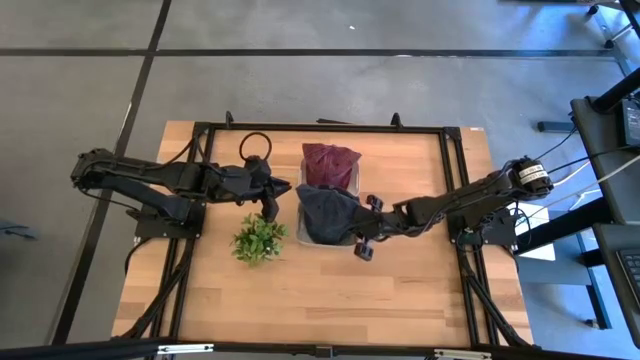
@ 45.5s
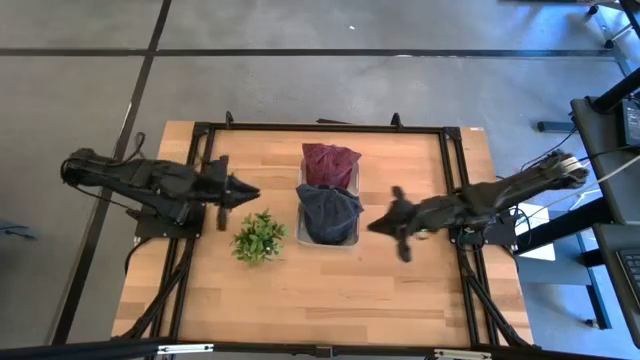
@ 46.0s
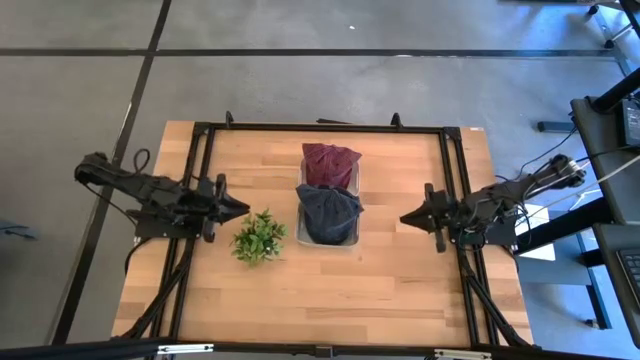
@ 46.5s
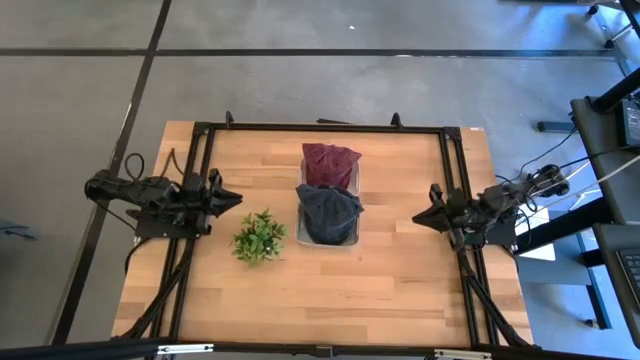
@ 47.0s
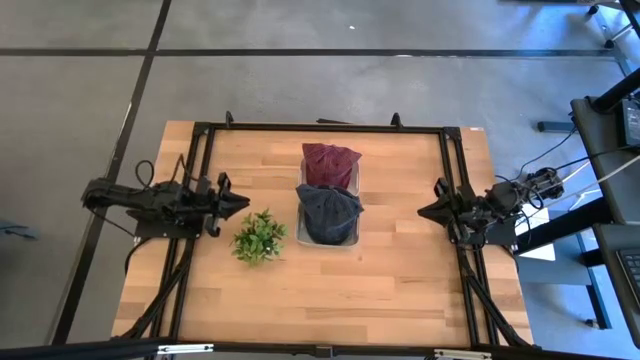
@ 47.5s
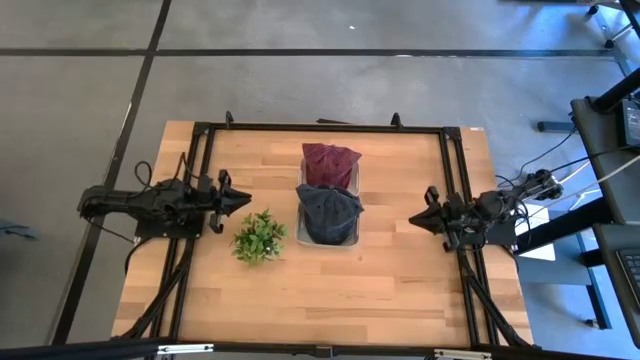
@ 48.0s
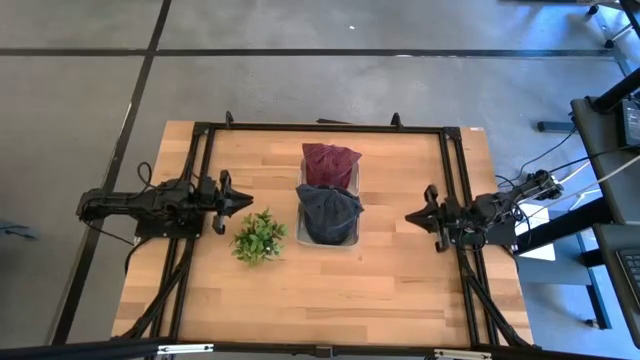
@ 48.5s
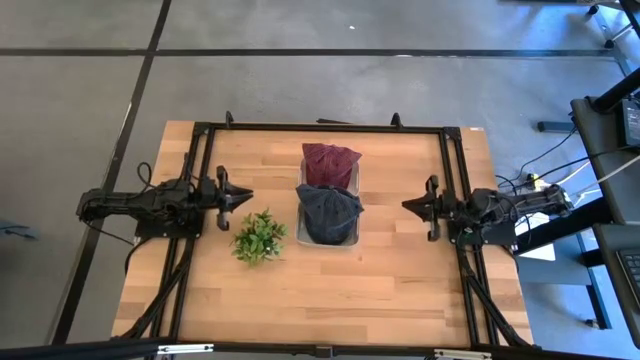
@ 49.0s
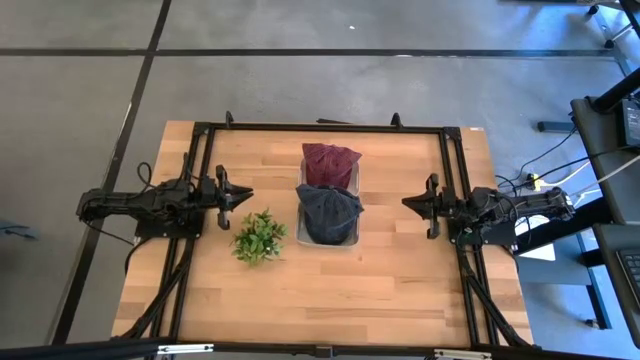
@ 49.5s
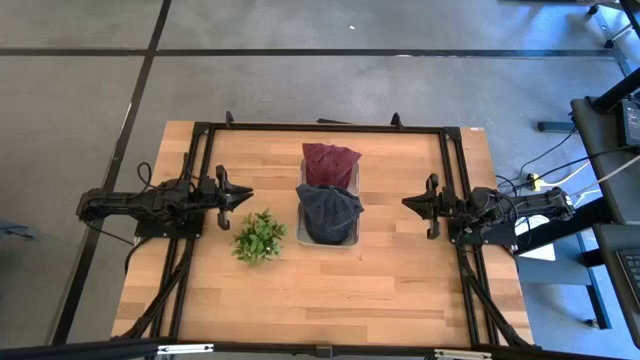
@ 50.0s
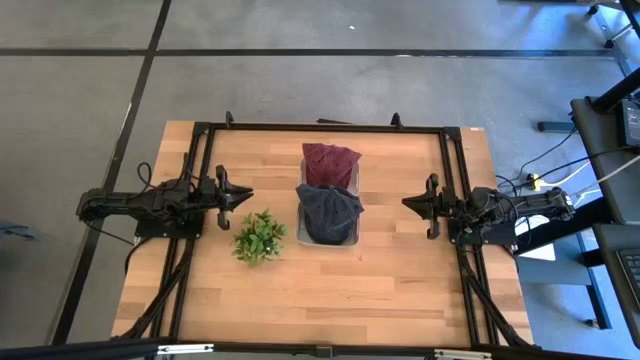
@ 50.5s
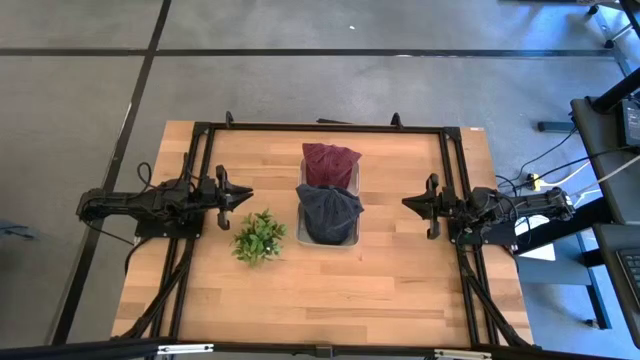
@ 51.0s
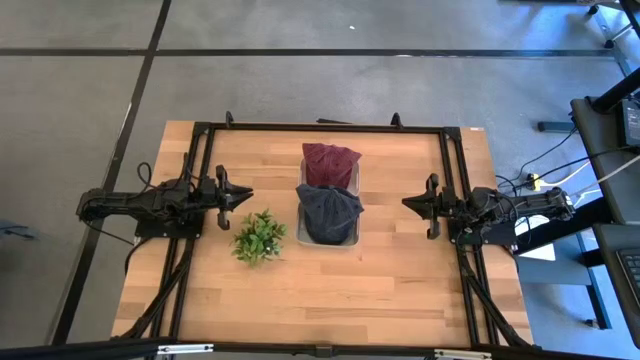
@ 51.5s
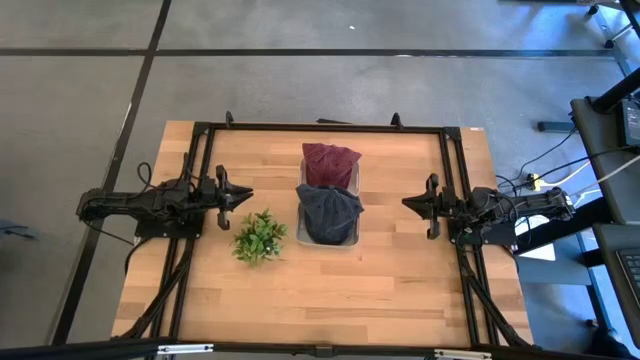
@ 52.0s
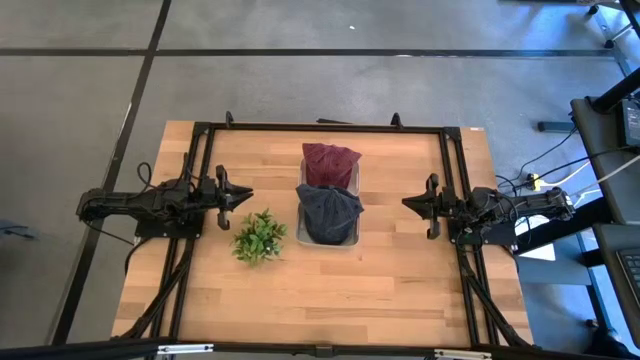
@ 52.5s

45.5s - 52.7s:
Task: Pick & Place hat
Return to Home Position

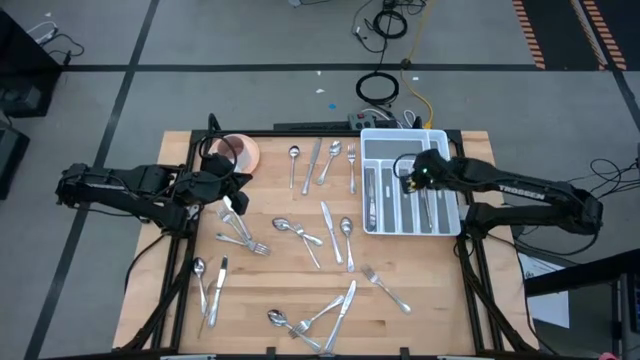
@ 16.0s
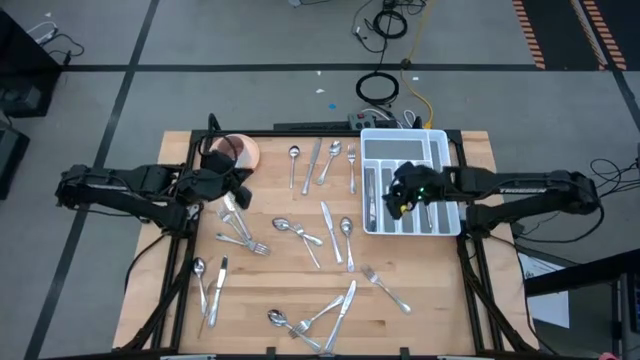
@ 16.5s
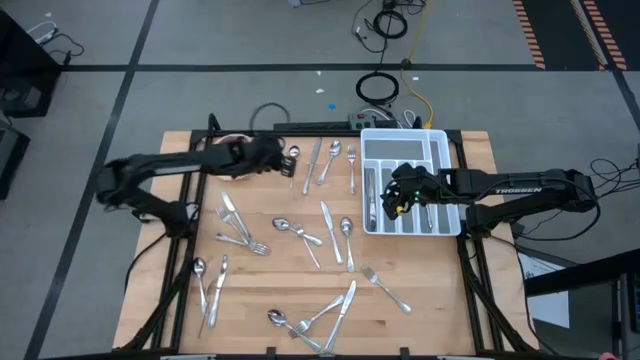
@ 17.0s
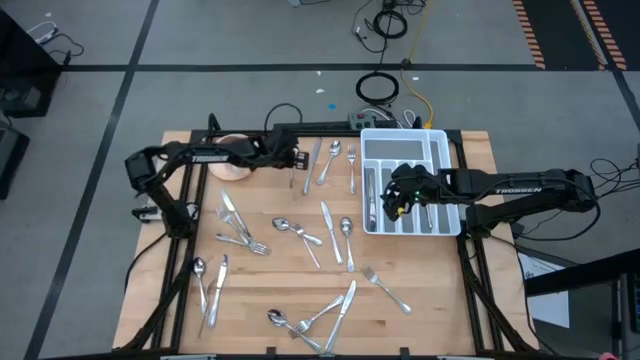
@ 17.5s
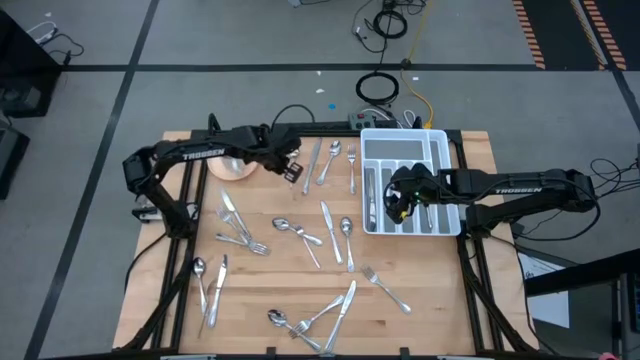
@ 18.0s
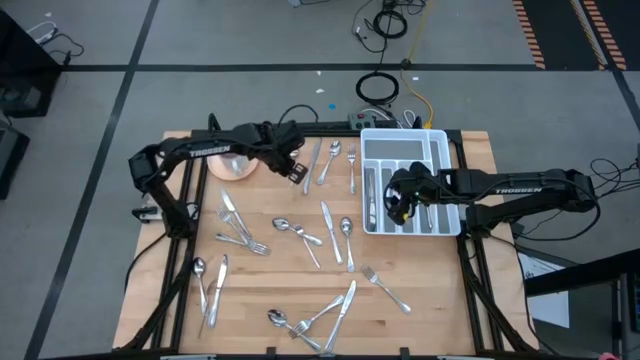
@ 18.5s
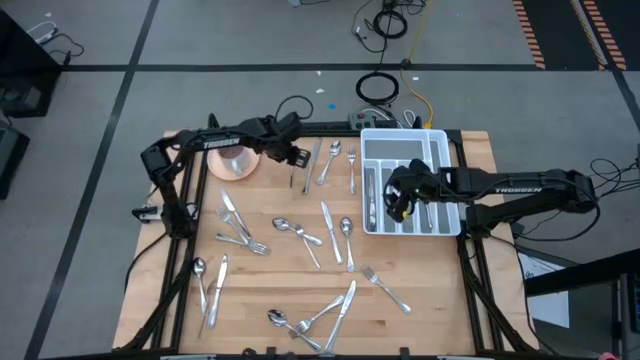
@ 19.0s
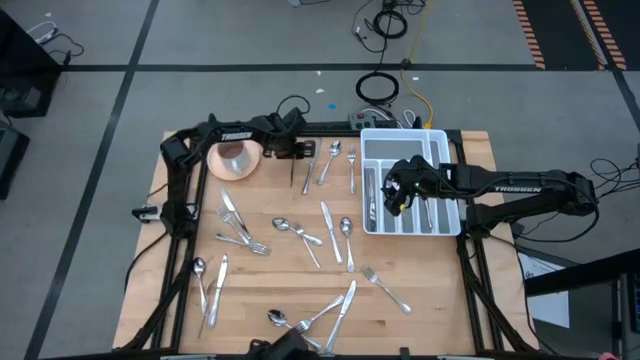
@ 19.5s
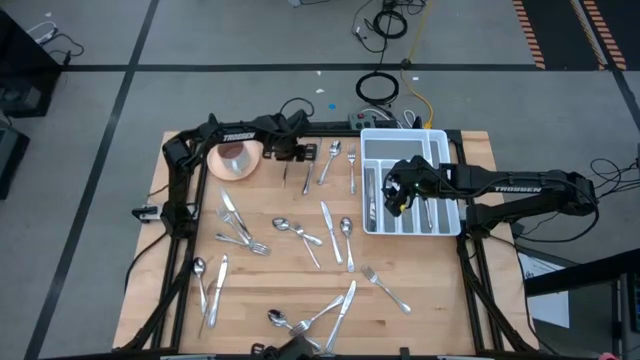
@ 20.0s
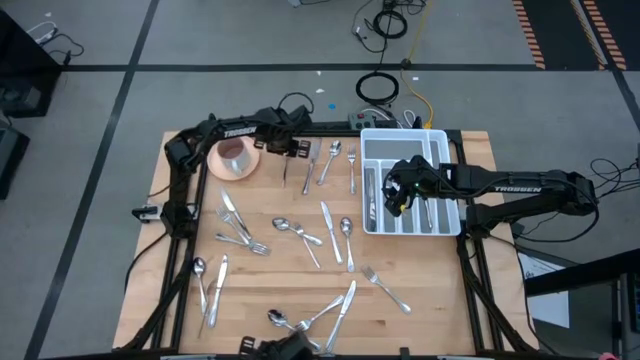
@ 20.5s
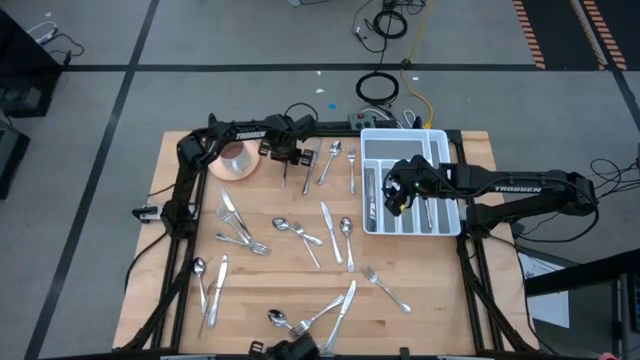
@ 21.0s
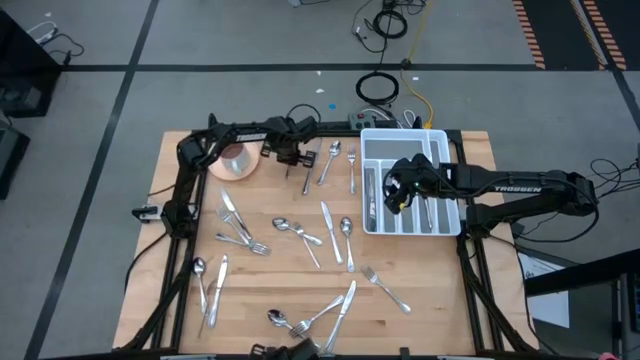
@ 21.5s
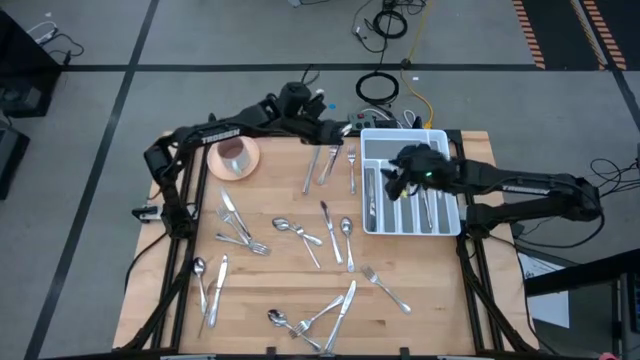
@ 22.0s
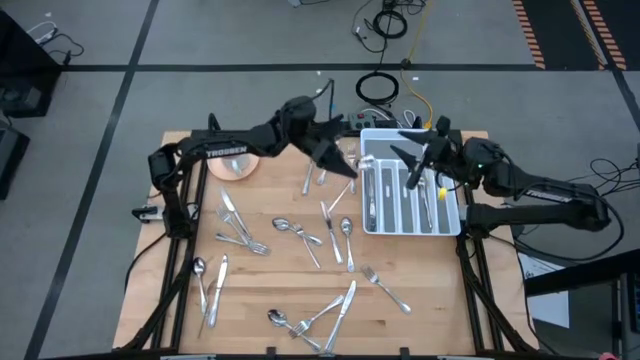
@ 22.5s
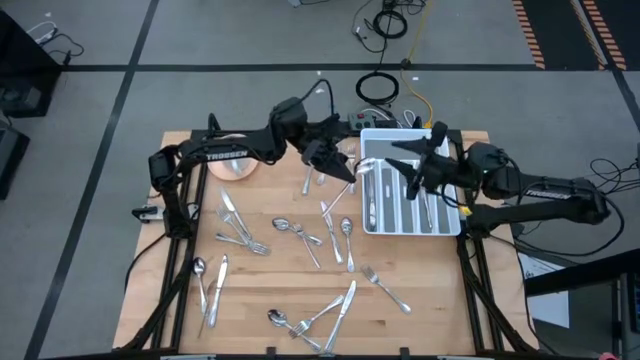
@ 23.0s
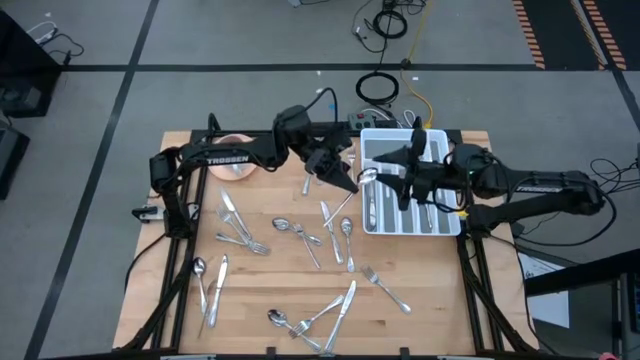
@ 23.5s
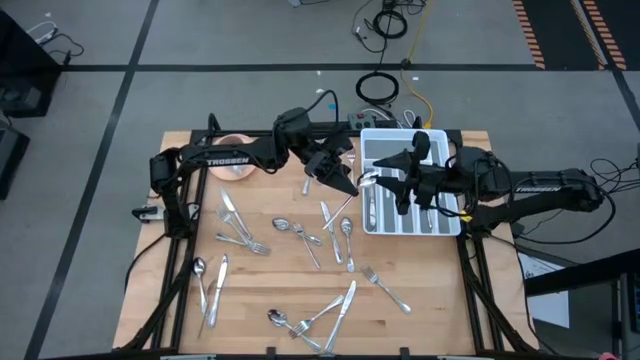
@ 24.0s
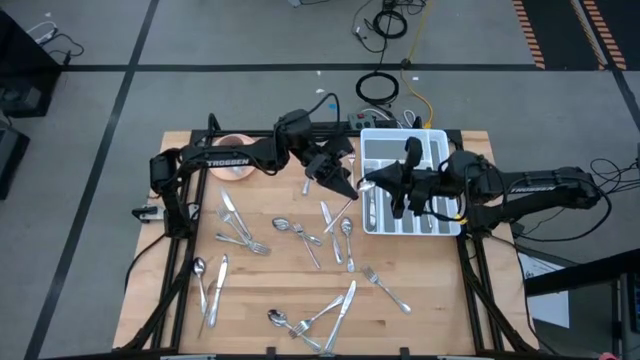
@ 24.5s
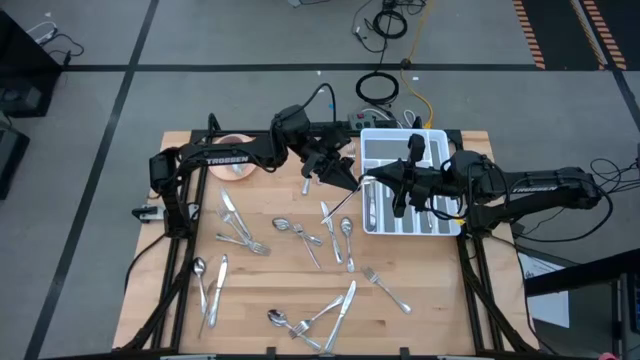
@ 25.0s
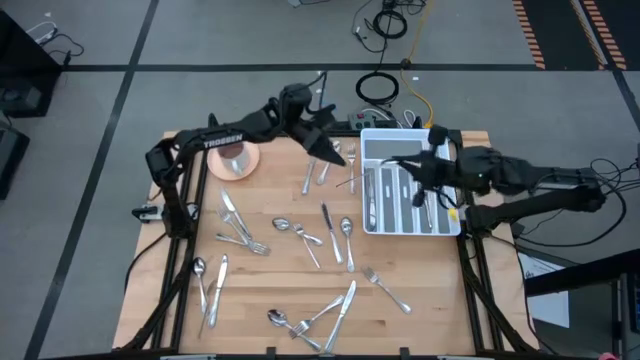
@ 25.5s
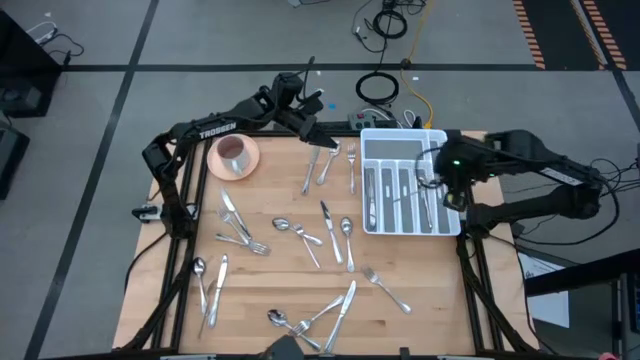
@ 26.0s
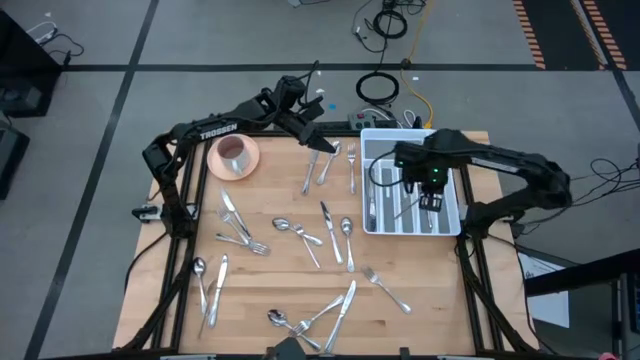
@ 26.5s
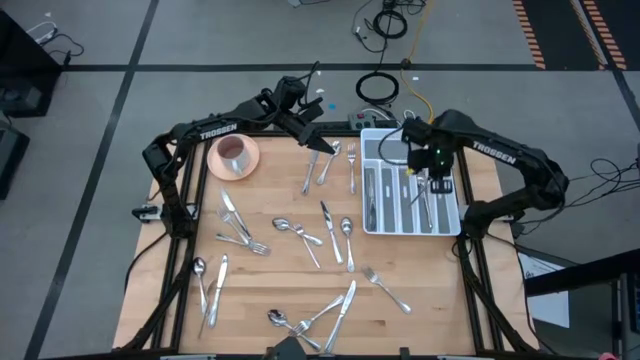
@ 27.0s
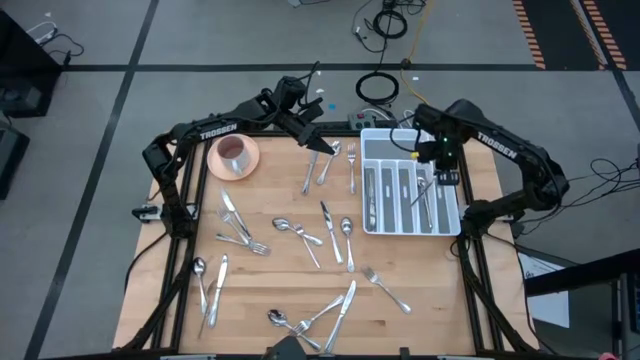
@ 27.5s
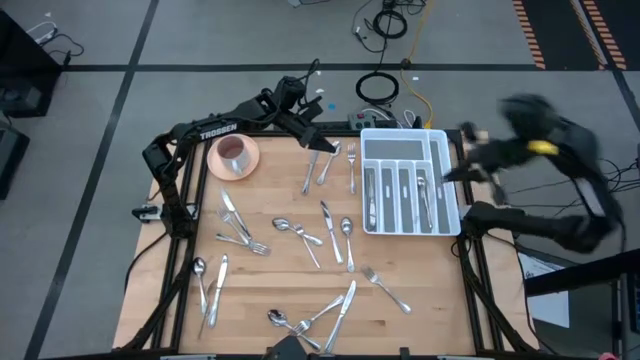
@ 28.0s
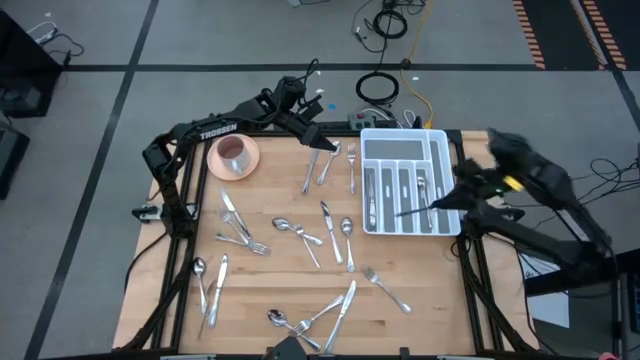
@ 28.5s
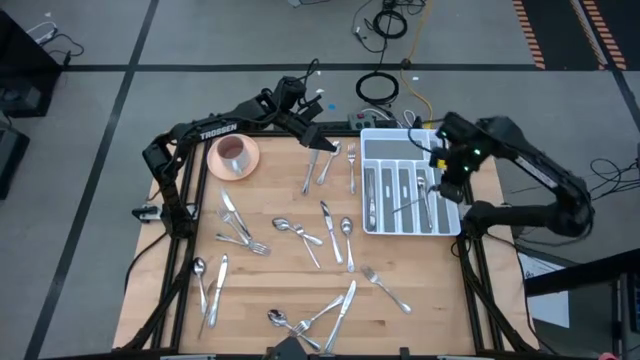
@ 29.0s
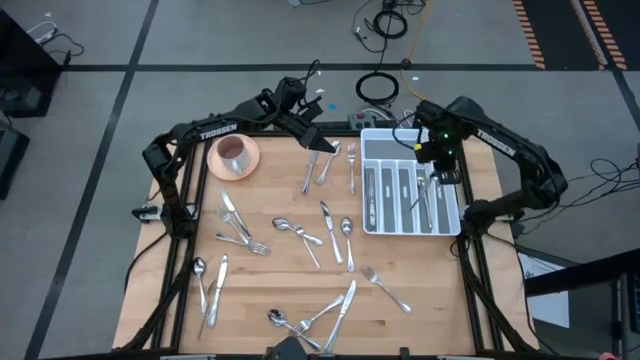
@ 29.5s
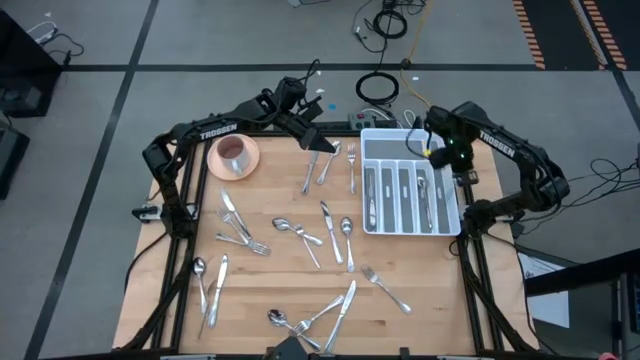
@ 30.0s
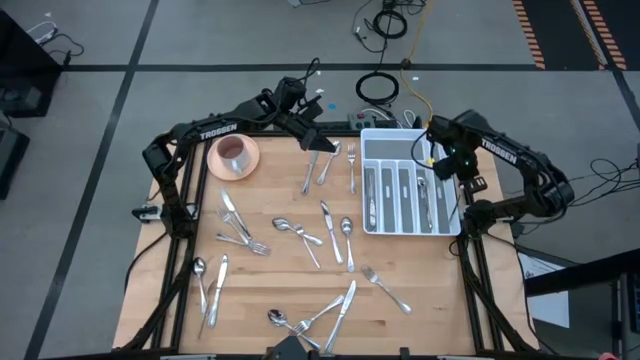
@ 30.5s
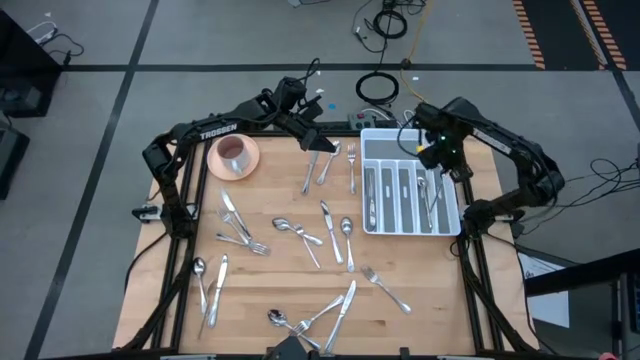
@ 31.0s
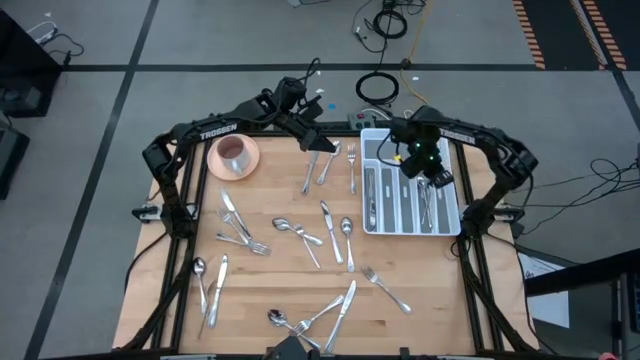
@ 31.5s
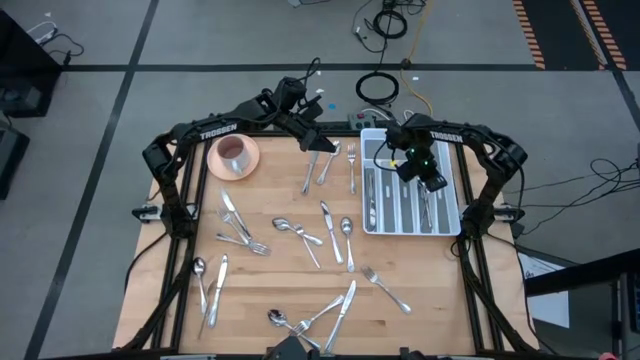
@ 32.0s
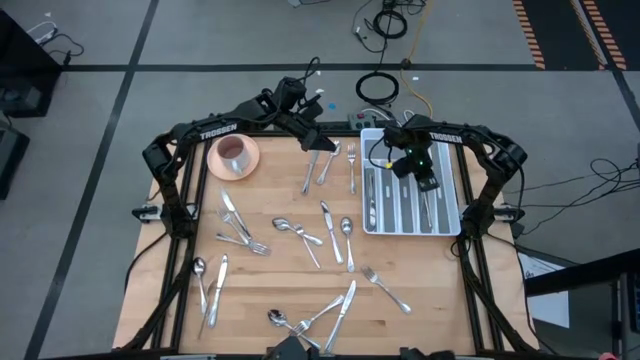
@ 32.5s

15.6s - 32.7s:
Task: Sort silverware
Put the silver spoon into the silverware rack
